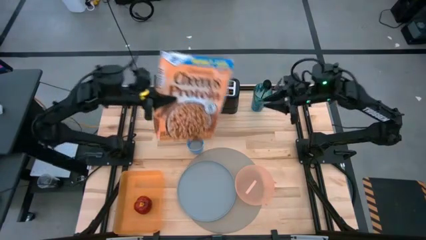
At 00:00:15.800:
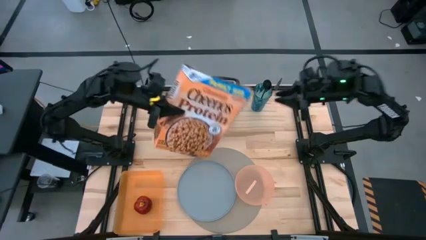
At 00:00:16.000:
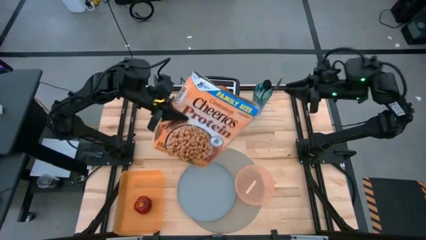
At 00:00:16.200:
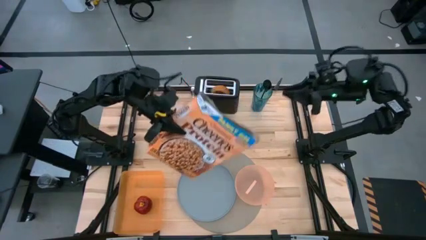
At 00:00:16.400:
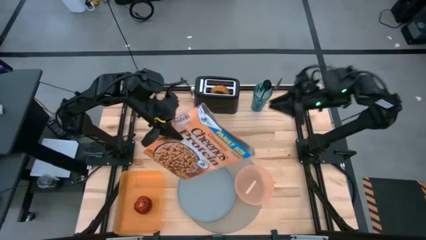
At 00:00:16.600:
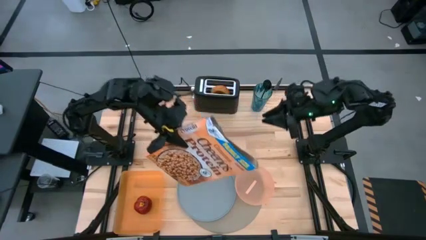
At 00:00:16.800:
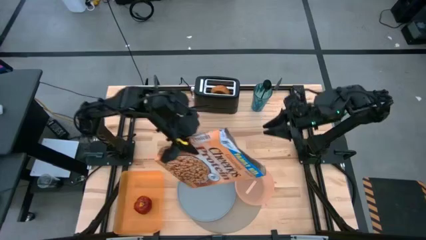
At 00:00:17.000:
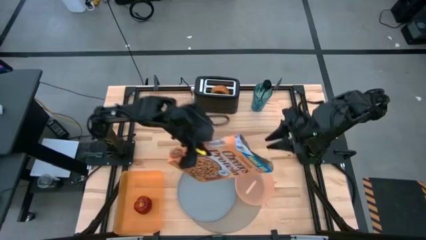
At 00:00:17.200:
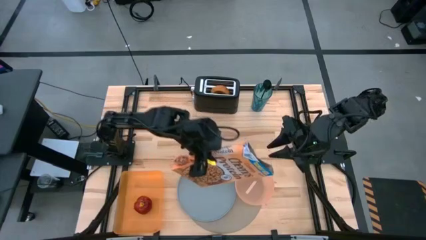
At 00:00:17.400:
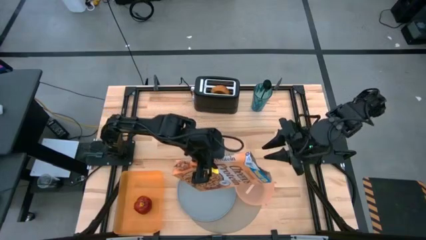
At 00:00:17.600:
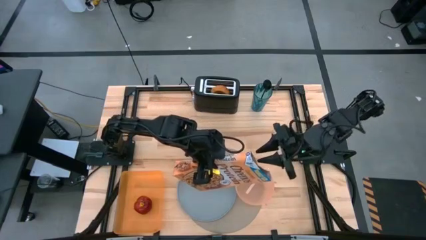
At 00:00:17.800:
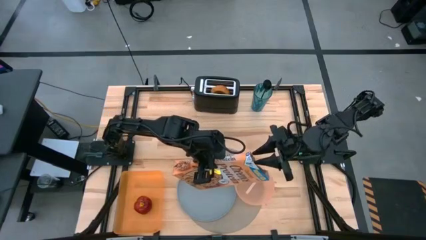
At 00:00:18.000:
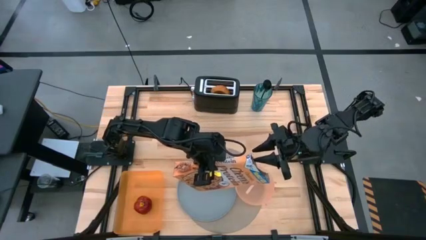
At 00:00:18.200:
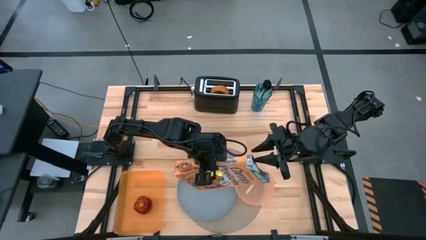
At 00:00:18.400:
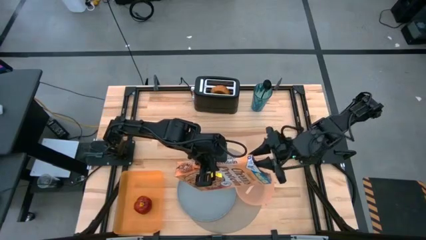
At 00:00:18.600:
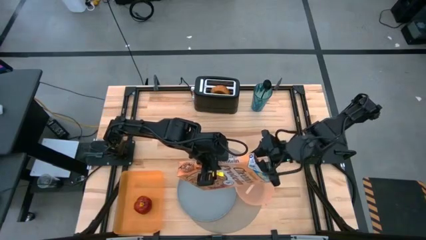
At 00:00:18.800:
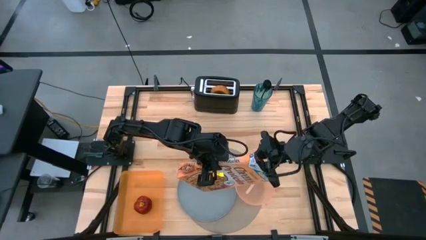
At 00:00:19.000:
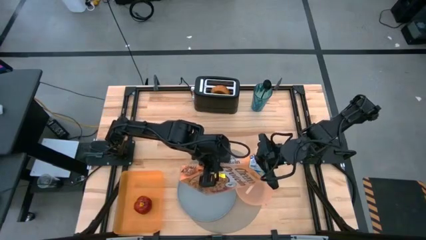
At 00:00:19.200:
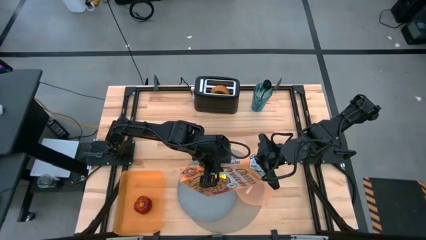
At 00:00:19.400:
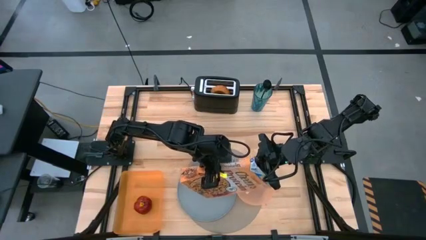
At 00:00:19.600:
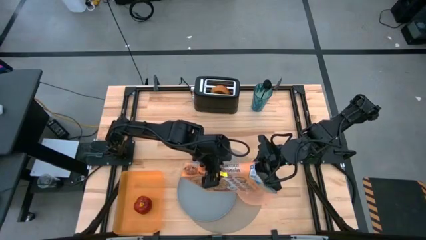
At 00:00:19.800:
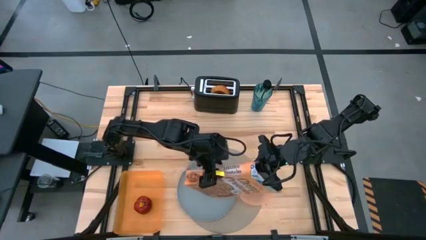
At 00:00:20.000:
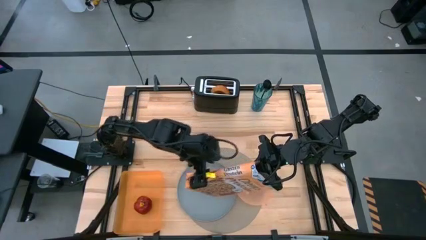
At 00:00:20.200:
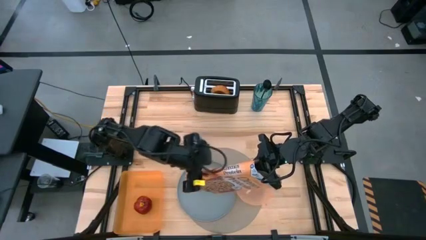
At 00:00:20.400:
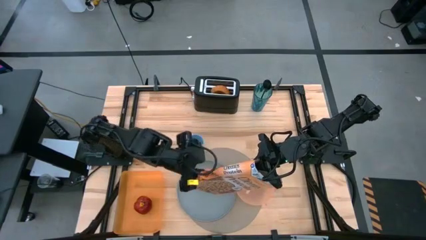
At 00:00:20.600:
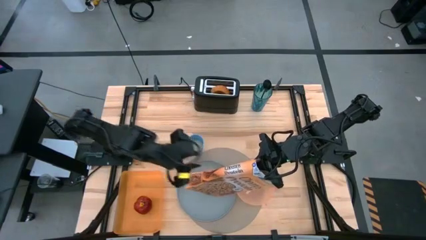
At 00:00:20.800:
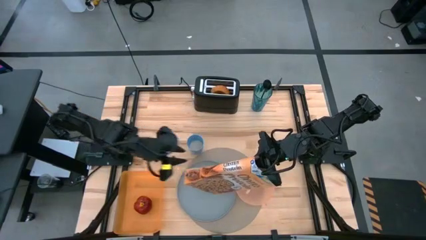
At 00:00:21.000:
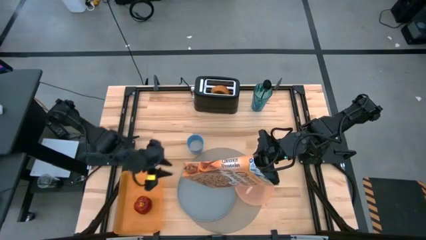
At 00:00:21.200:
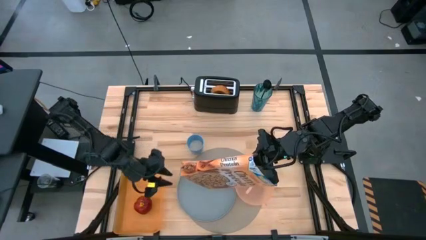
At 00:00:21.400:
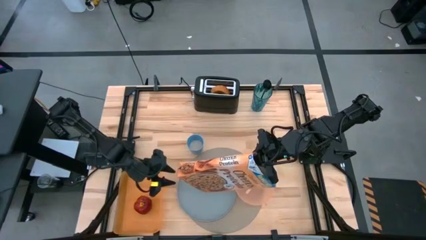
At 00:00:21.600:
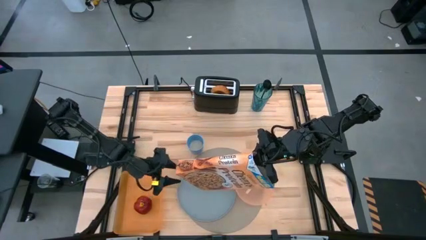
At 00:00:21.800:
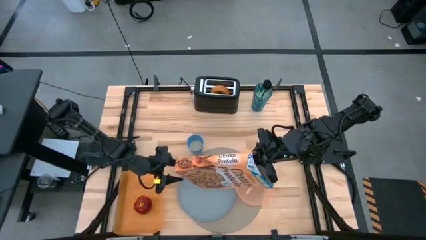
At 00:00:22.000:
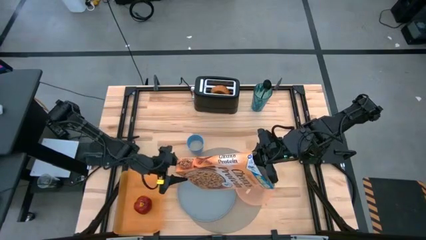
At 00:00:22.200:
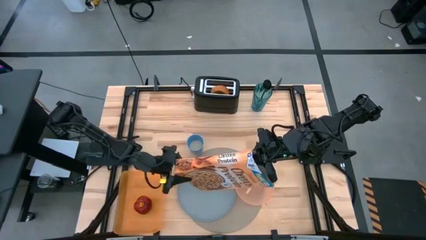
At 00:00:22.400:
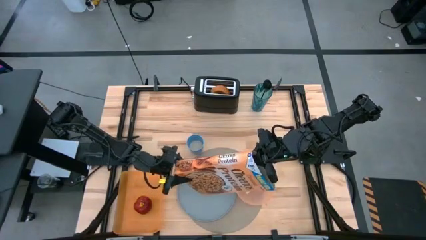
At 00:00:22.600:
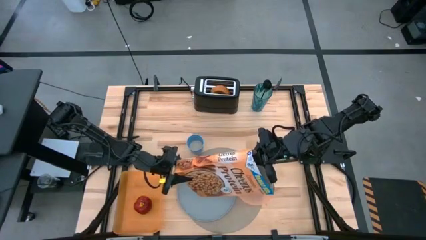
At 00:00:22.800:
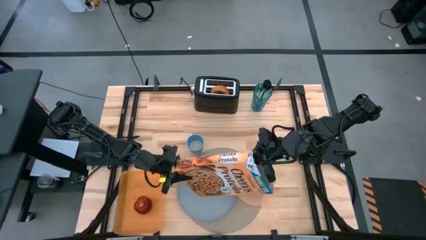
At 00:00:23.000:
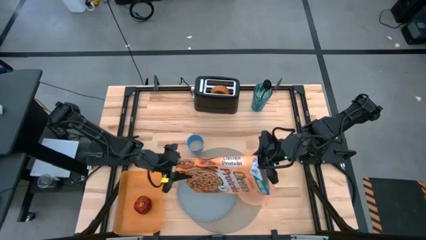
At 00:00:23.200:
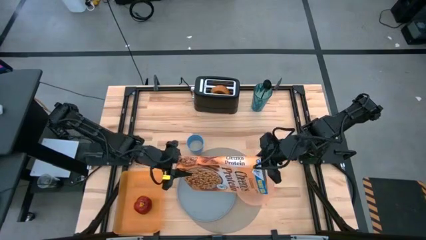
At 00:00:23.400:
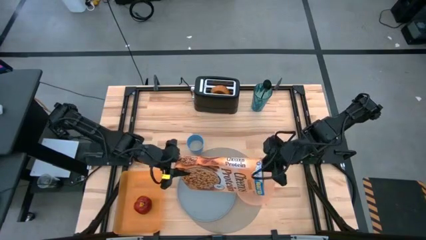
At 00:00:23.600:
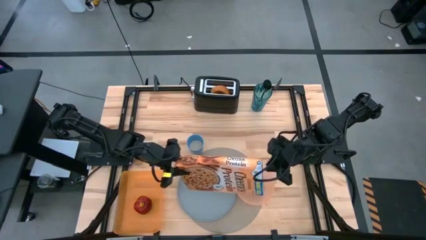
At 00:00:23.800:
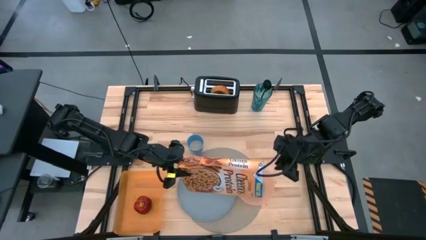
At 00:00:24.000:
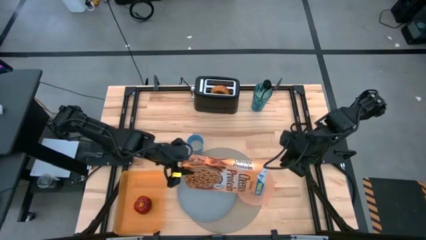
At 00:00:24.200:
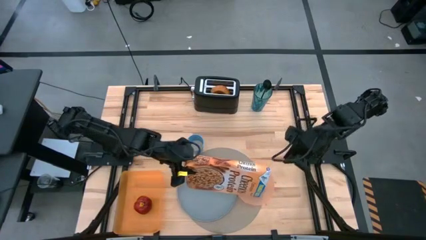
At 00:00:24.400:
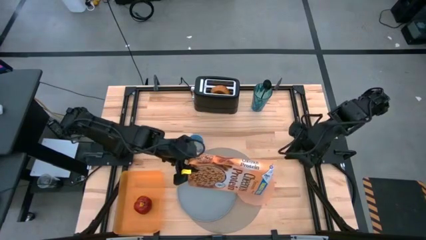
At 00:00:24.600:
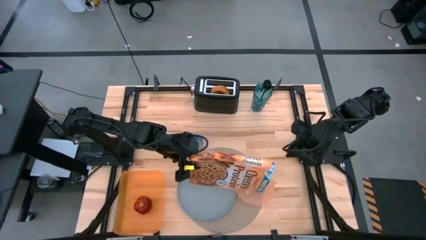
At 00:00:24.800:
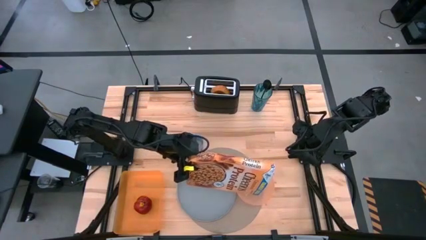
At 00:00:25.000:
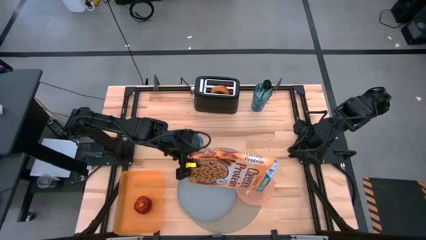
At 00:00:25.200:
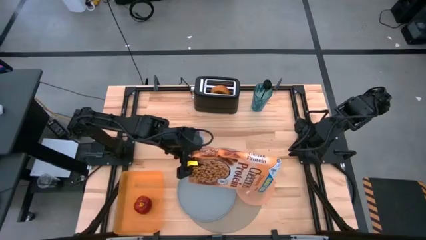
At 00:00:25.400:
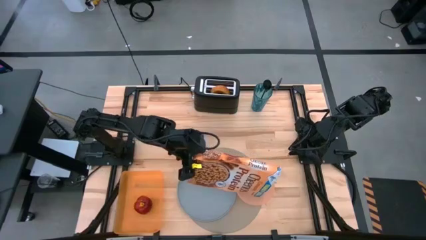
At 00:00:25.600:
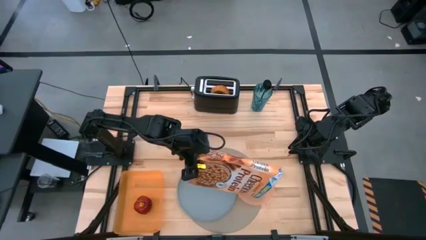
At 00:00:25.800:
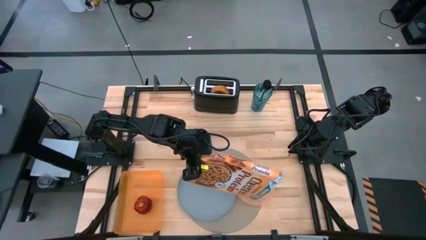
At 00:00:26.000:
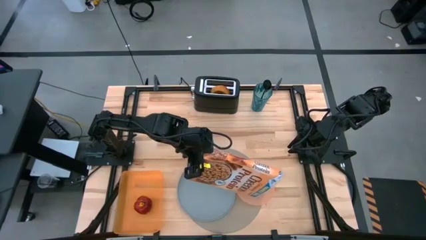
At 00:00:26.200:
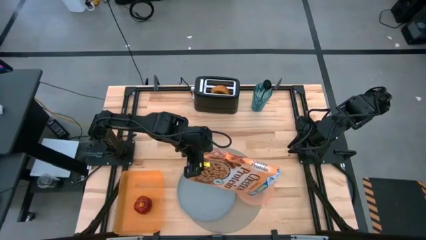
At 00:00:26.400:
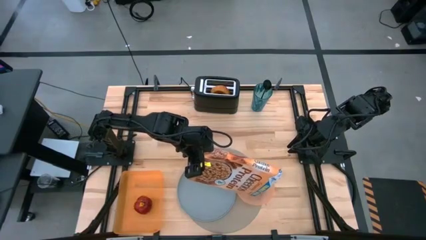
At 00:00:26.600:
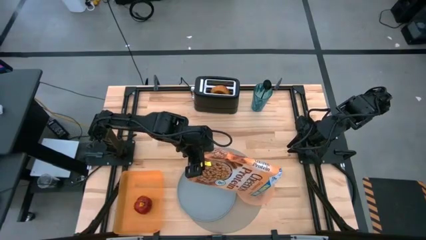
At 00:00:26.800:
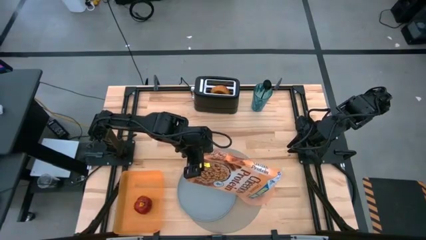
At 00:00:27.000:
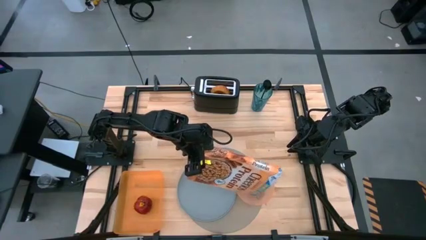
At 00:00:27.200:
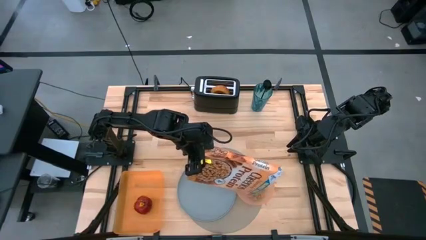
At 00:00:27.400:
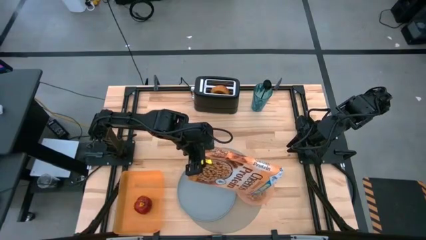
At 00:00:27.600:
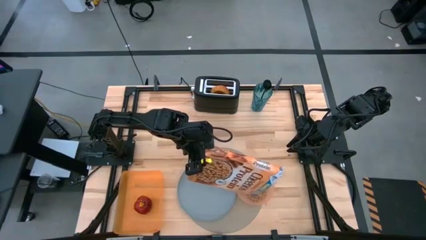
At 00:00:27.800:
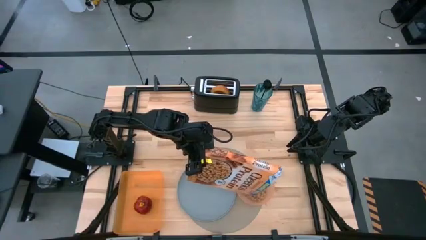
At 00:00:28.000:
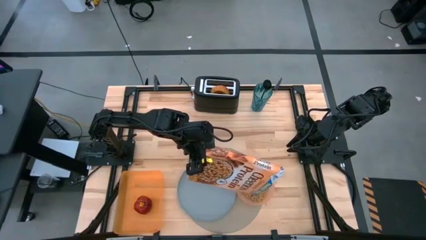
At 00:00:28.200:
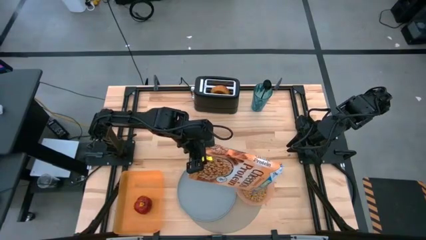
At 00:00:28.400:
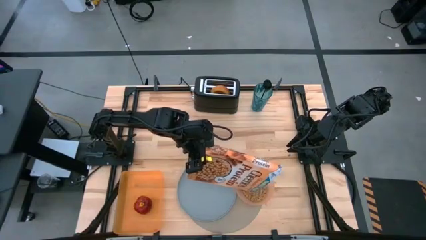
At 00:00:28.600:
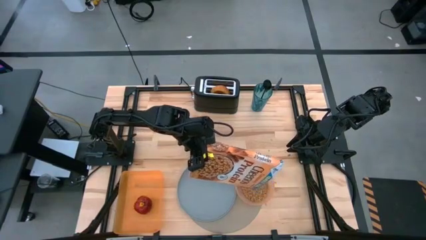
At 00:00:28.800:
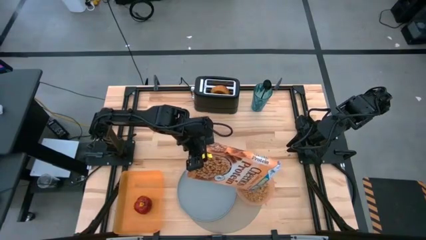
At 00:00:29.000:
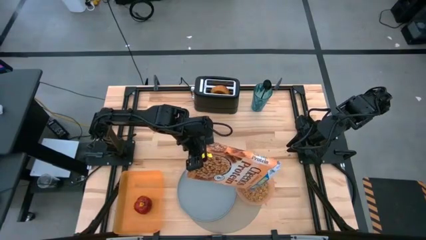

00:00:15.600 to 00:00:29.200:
Task: Arrange a breakfast setting
Pour the cereal from the cereal box into the orange bowl
